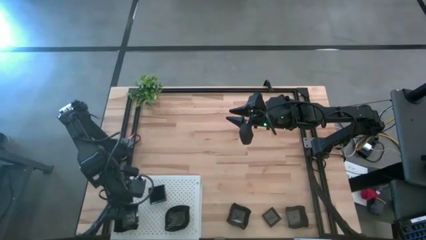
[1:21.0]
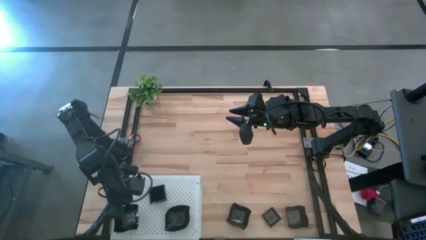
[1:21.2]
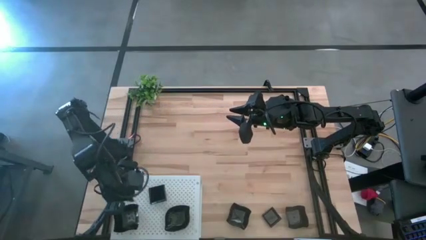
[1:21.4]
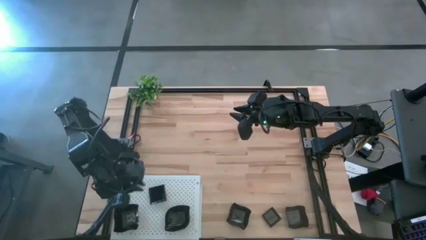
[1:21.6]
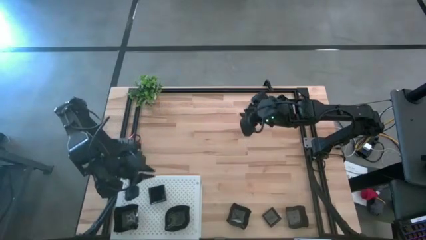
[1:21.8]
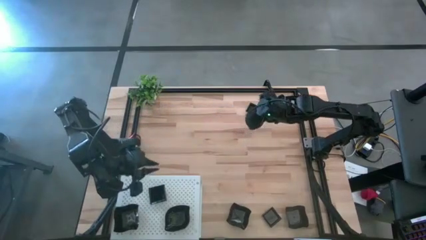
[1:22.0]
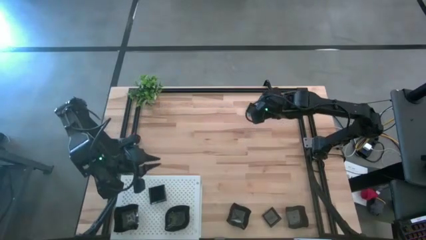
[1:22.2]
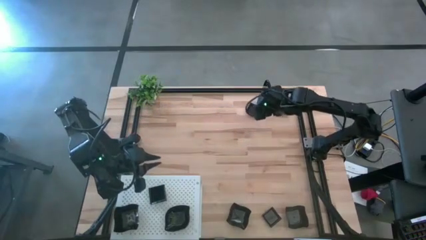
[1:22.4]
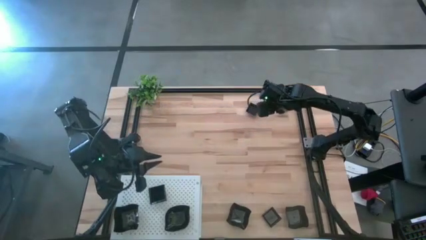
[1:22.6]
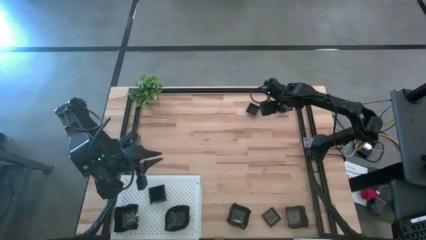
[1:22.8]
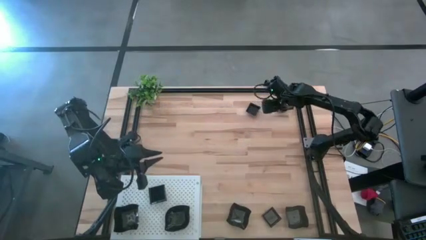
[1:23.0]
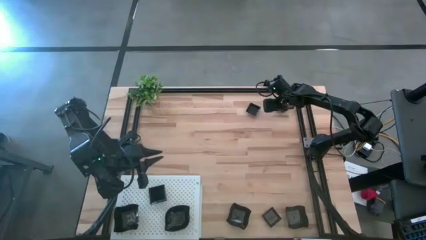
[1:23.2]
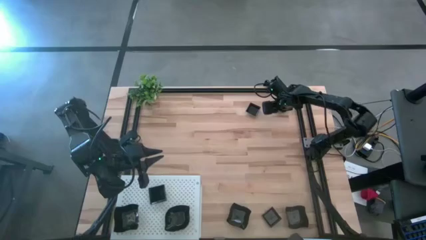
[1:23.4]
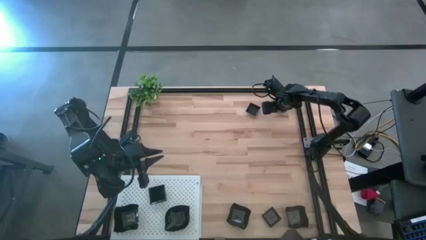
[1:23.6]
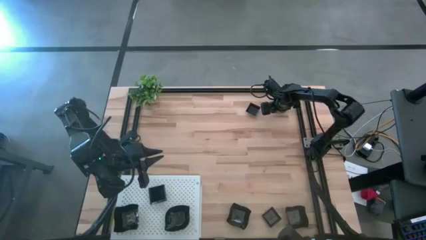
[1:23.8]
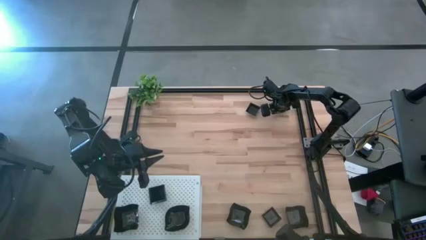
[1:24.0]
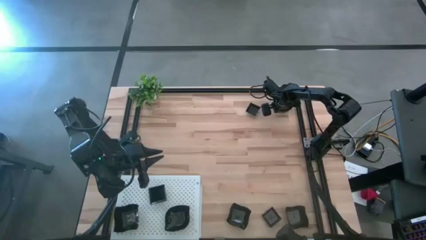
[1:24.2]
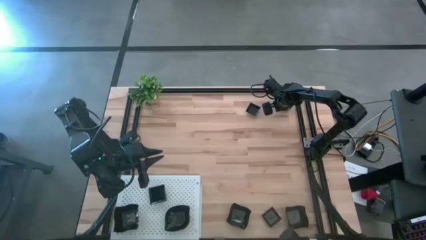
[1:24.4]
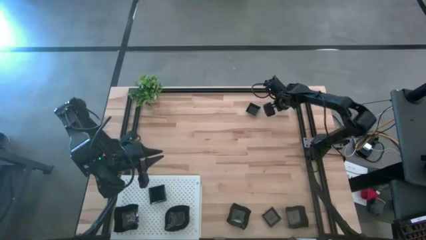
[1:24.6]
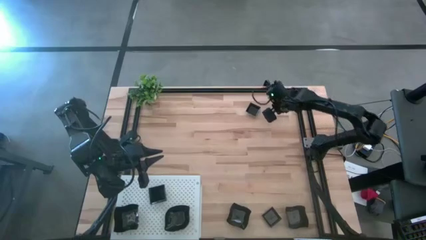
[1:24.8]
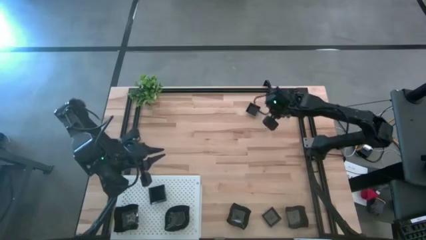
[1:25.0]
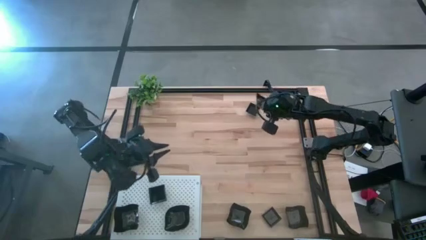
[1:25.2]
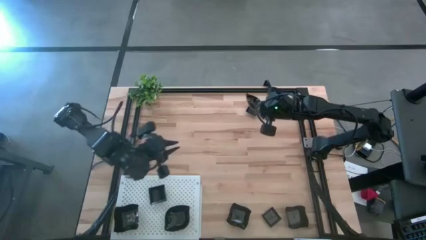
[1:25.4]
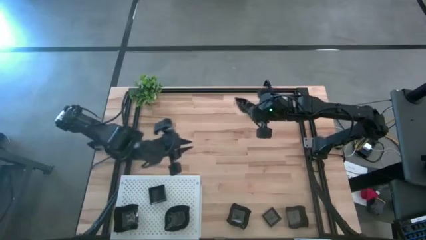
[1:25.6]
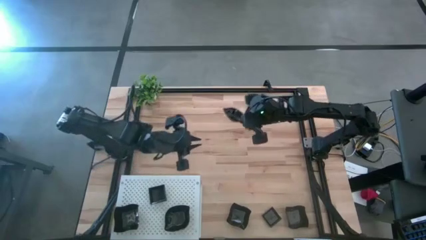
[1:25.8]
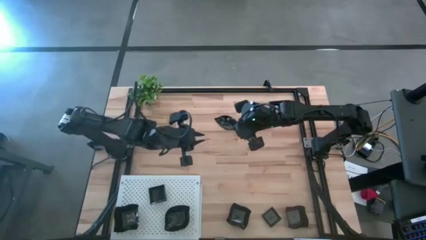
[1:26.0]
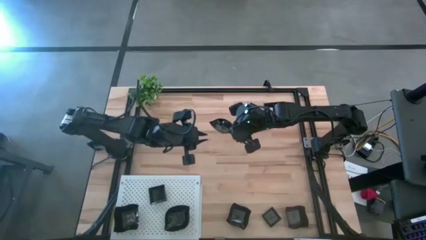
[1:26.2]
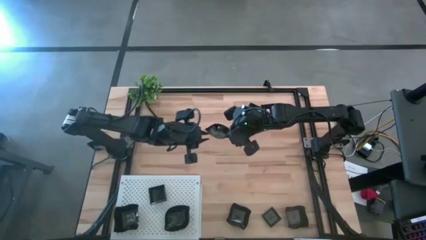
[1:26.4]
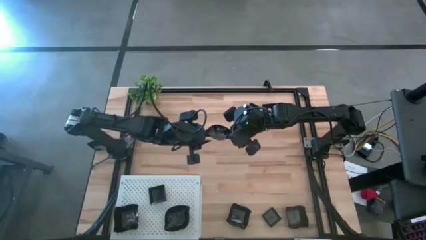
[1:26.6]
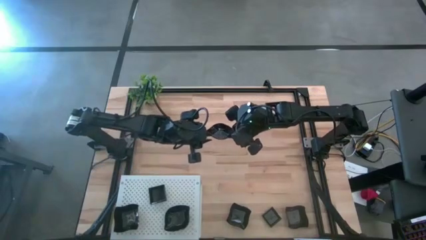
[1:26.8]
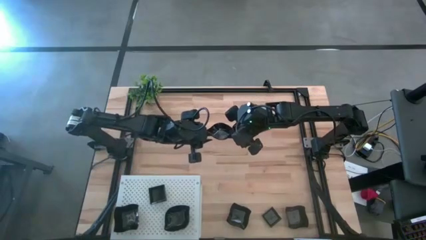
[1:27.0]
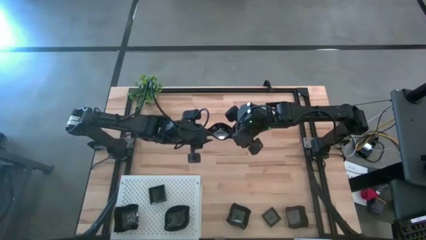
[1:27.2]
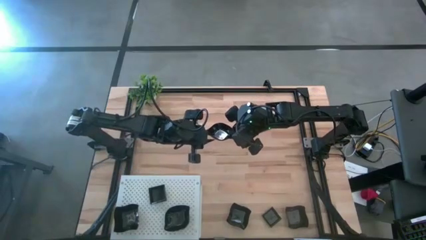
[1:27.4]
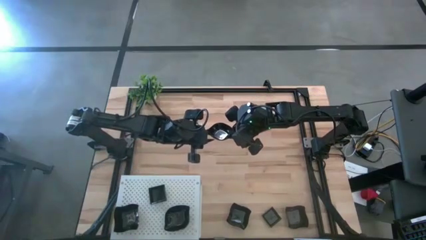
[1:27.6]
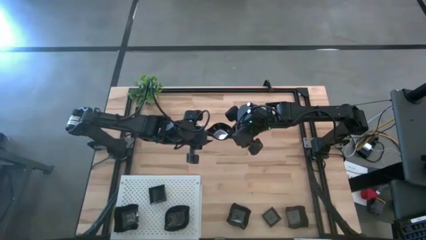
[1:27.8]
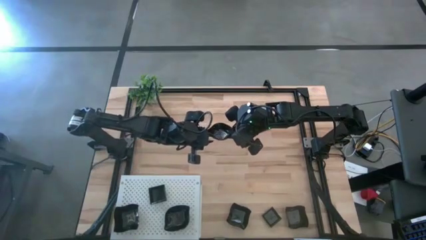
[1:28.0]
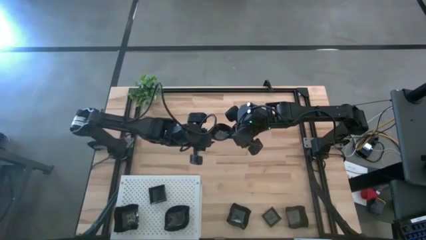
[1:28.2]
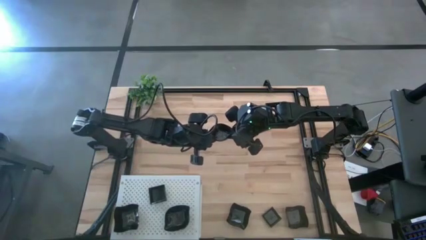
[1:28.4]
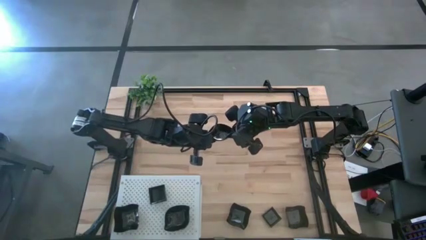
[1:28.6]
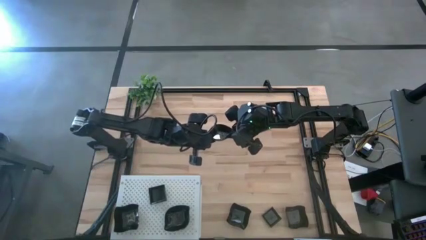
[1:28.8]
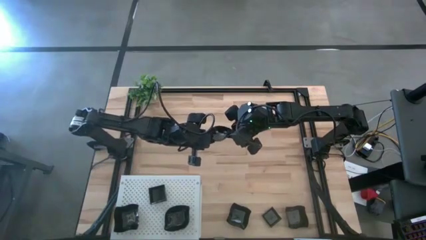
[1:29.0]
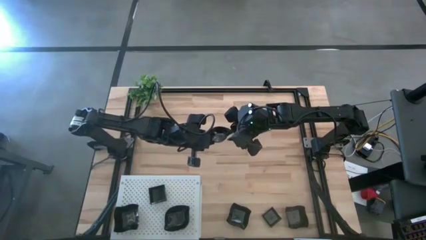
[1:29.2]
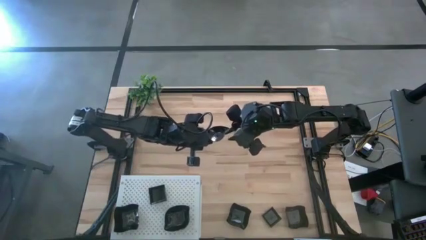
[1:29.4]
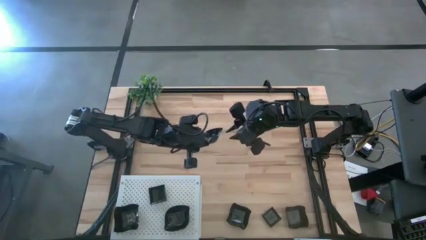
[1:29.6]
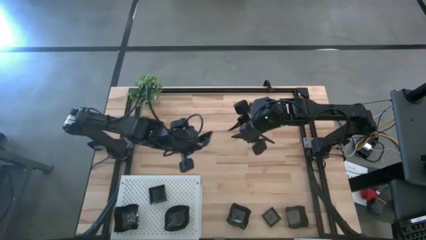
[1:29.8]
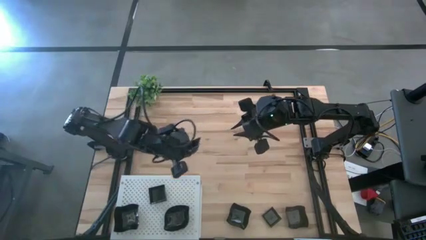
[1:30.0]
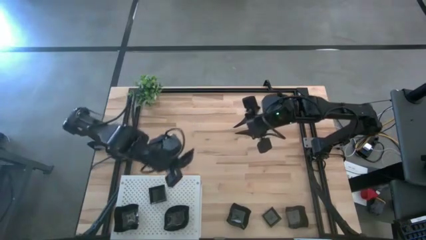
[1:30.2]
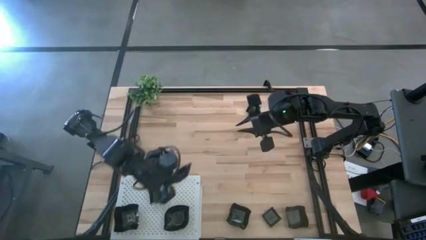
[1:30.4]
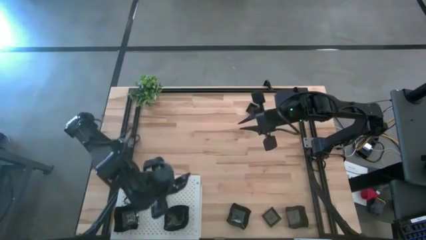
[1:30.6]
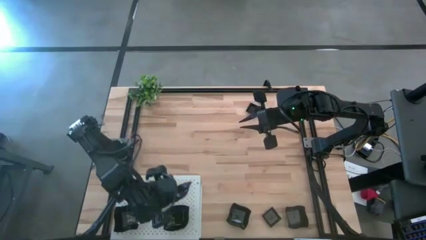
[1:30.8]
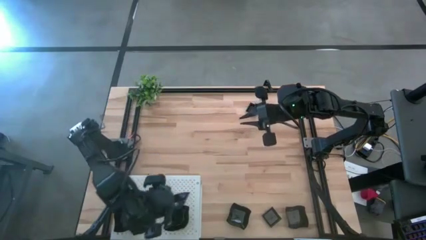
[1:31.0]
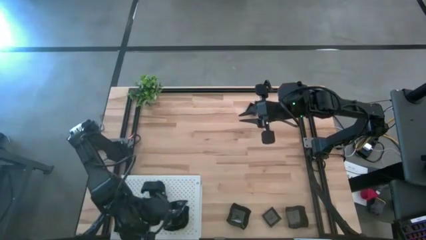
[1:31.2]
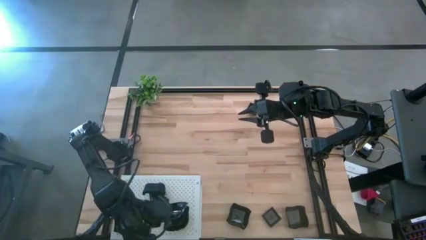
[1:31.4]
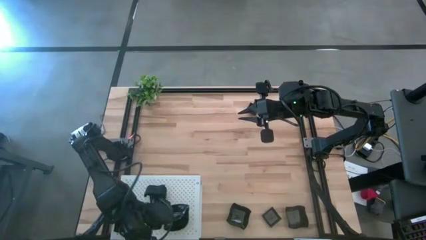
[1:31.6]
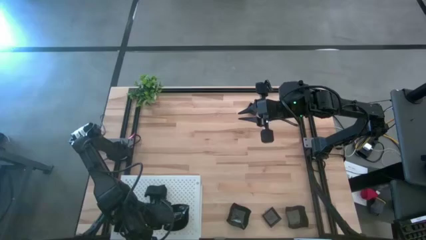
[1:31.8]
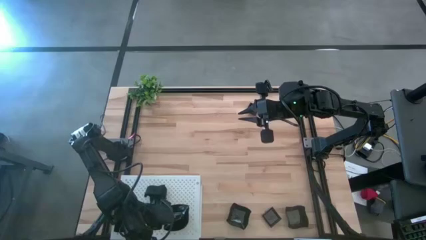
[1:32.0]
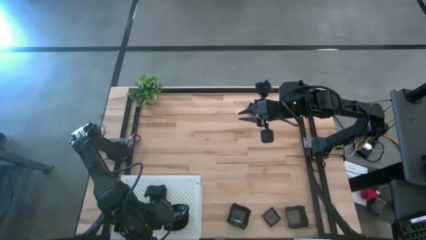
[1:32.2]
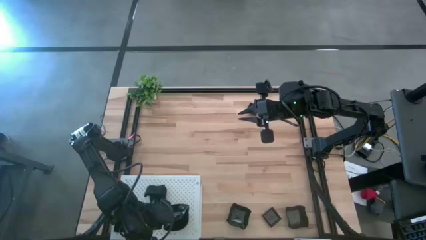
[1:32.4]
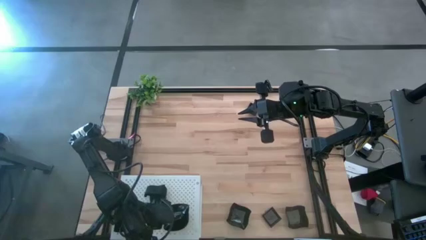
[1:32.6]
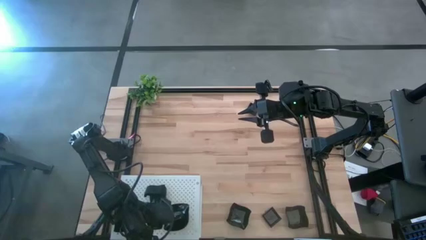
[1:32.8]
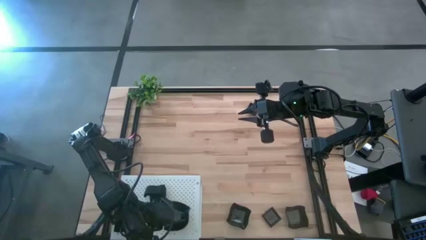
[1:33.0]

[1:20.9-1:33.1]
Task: Pick & Place Mini shaped plates
Stack the leaf shaped plate on top of the leaf shaped plate on the shelf
